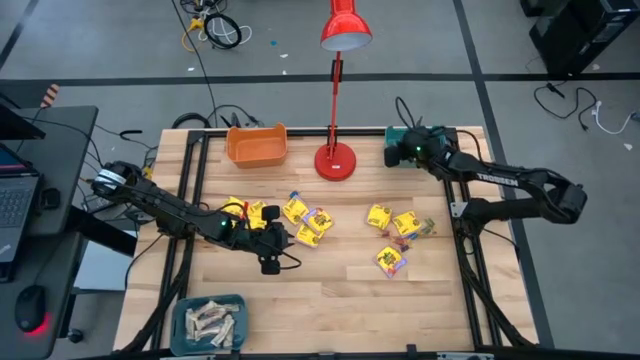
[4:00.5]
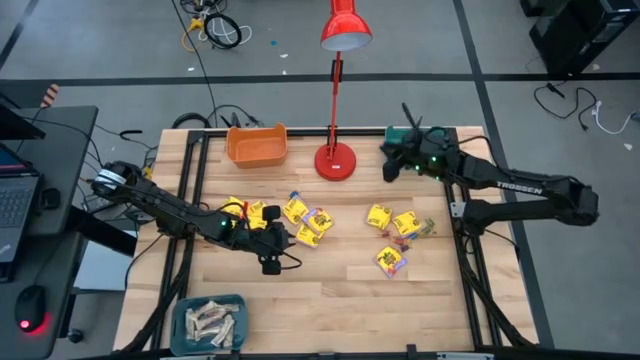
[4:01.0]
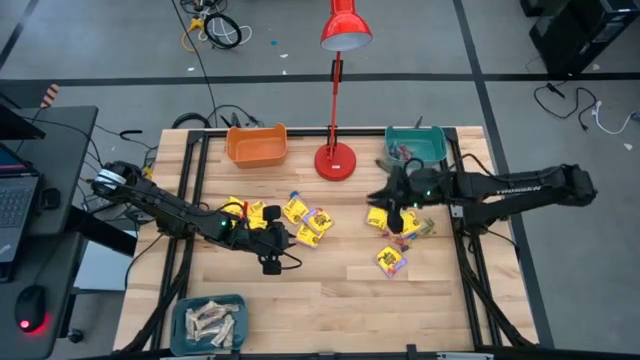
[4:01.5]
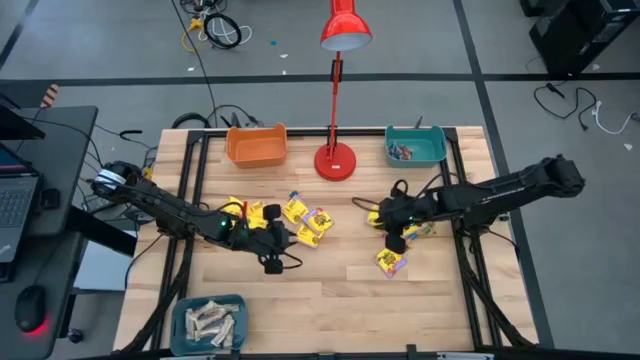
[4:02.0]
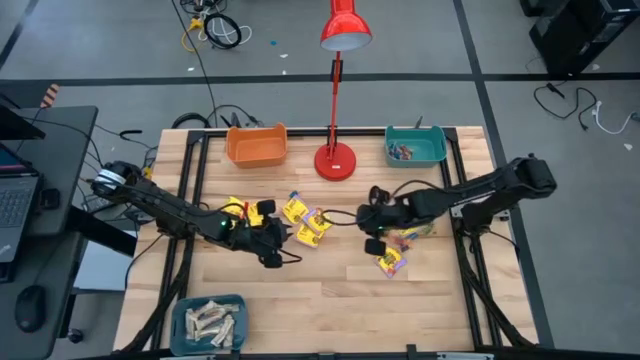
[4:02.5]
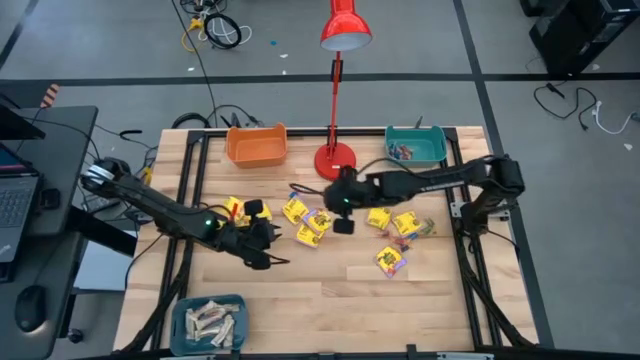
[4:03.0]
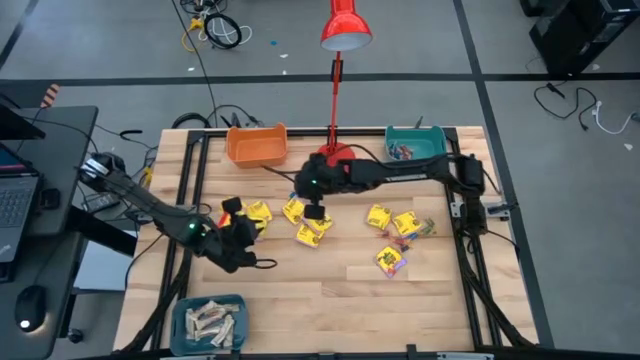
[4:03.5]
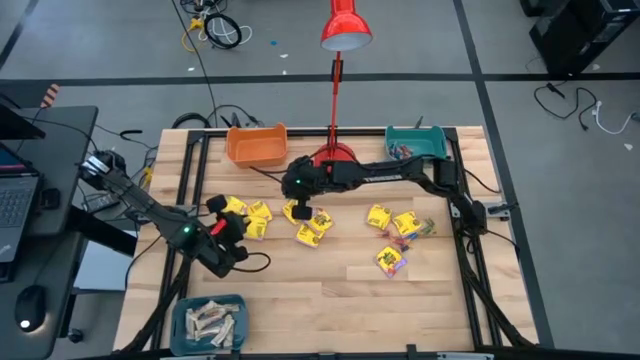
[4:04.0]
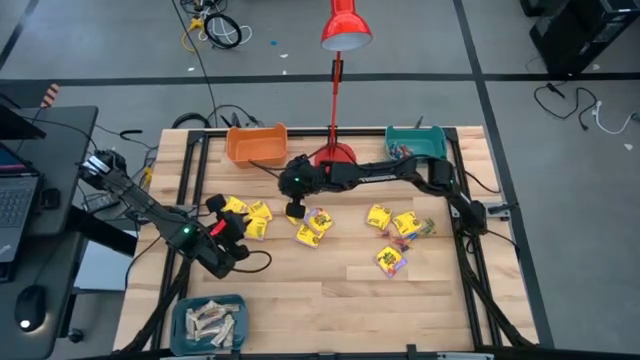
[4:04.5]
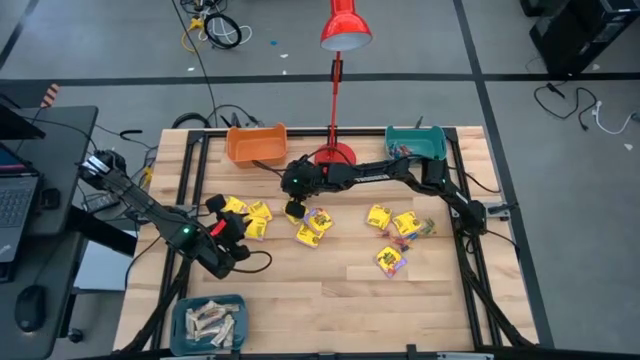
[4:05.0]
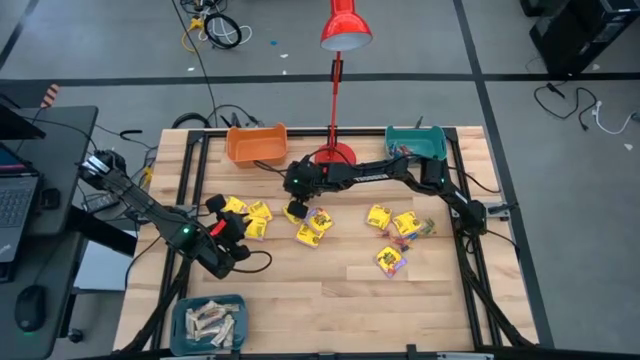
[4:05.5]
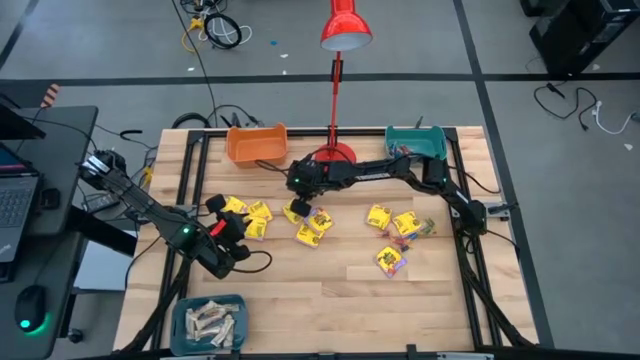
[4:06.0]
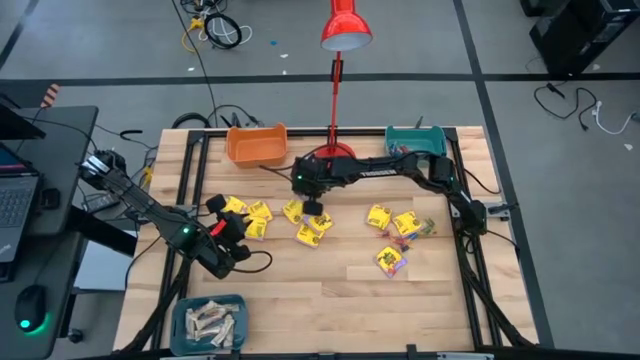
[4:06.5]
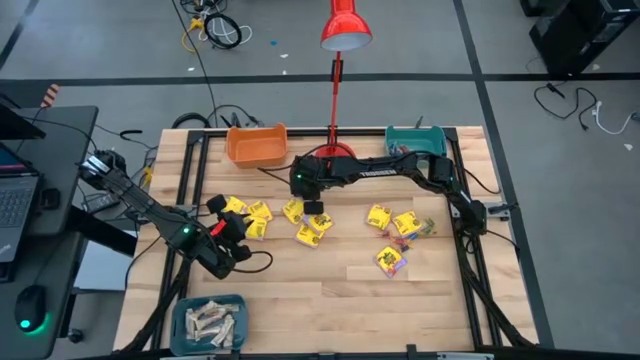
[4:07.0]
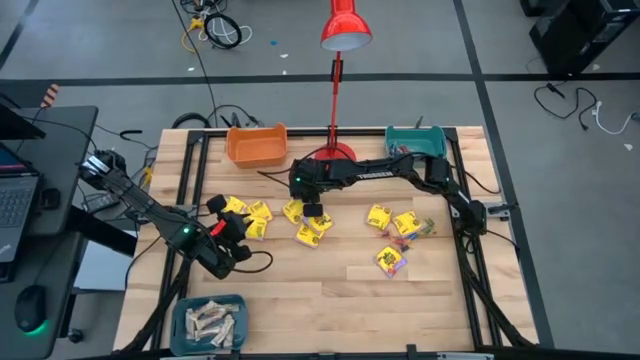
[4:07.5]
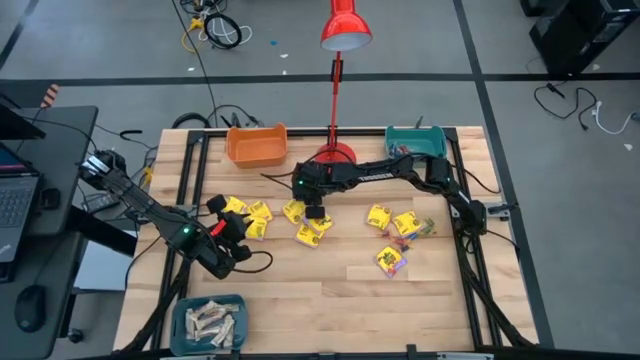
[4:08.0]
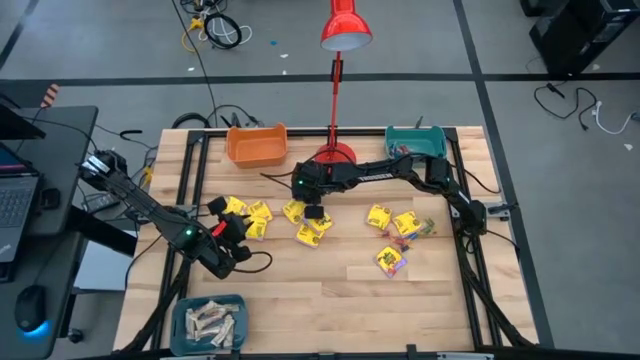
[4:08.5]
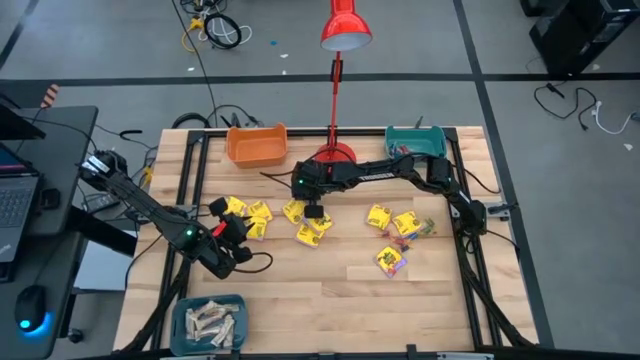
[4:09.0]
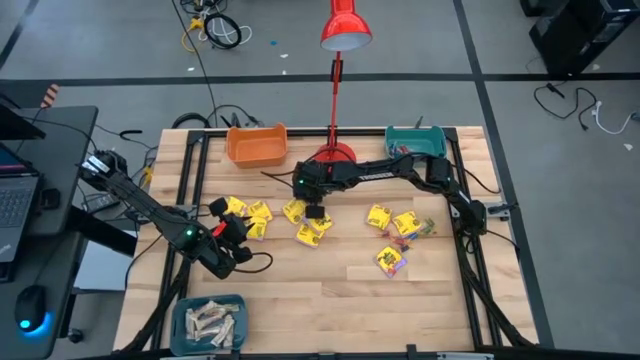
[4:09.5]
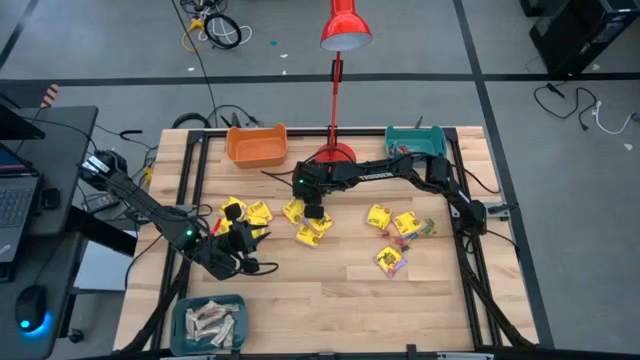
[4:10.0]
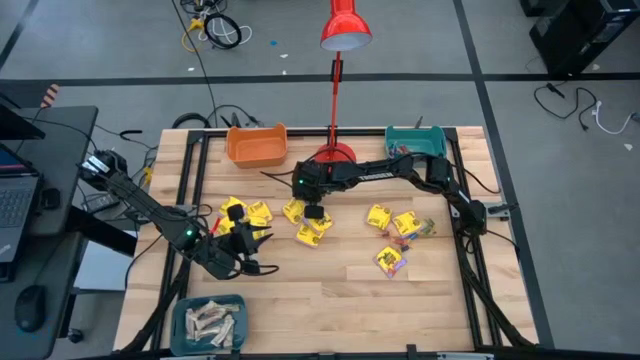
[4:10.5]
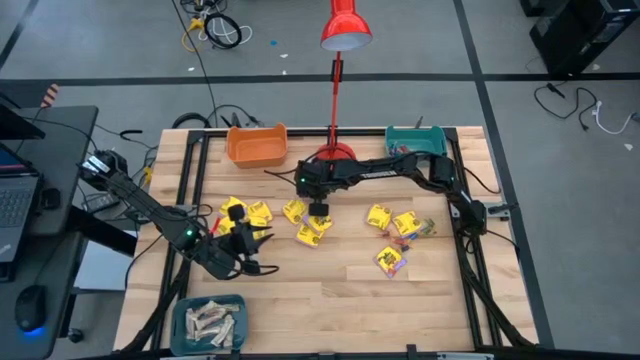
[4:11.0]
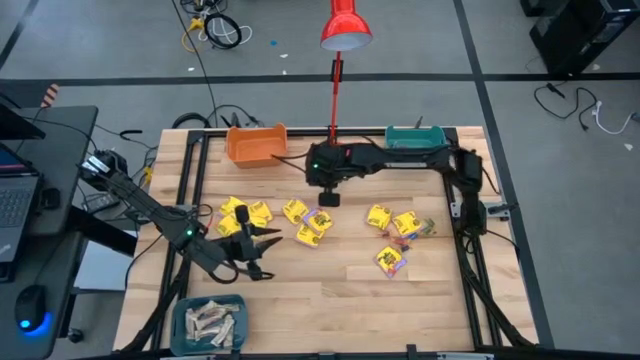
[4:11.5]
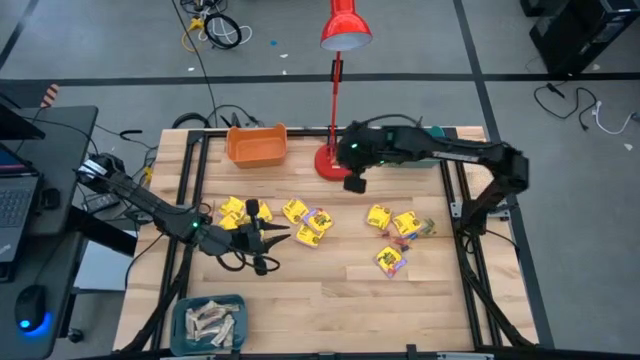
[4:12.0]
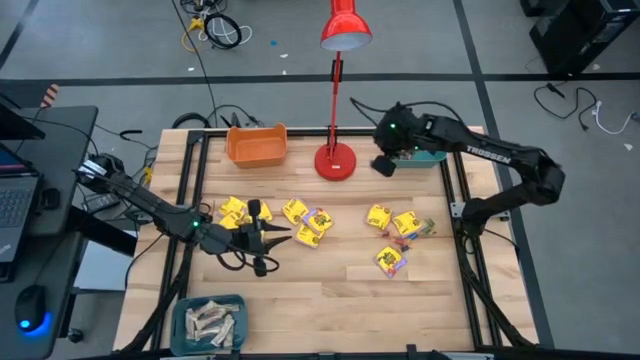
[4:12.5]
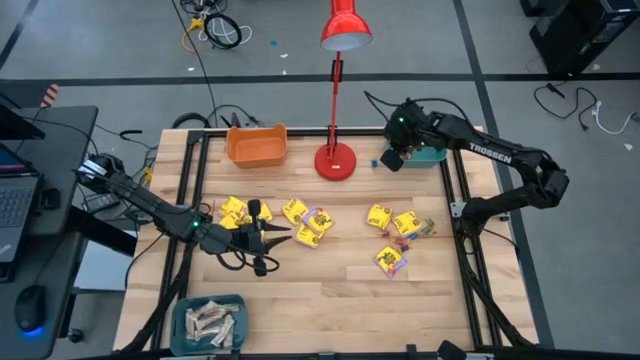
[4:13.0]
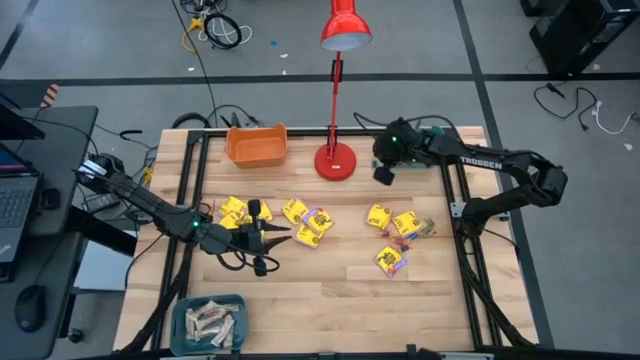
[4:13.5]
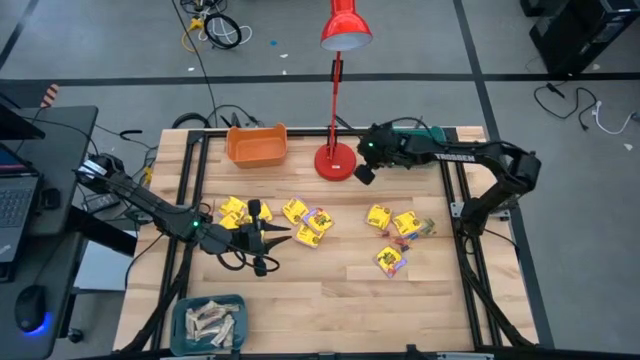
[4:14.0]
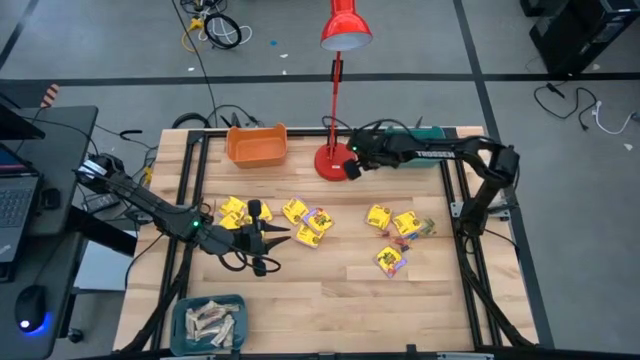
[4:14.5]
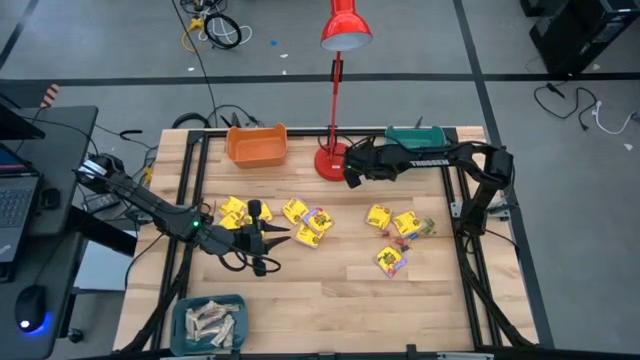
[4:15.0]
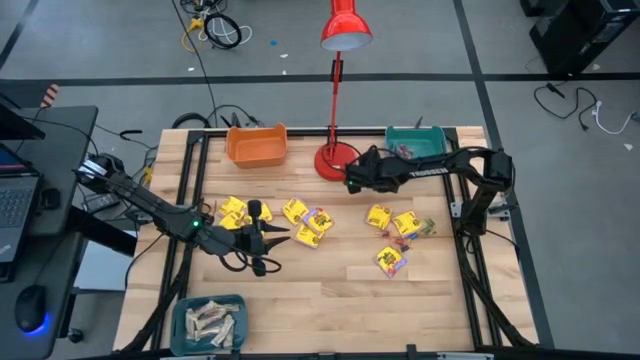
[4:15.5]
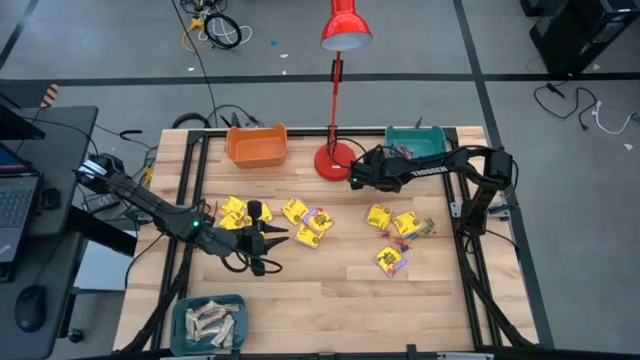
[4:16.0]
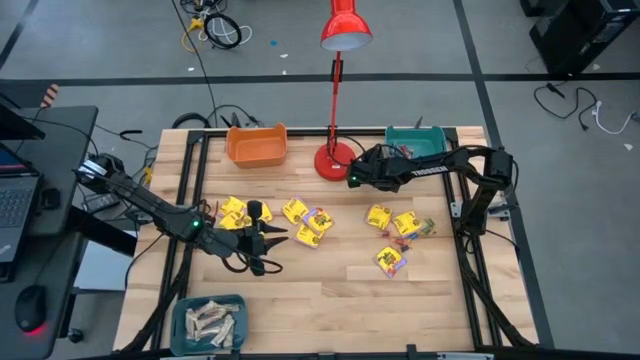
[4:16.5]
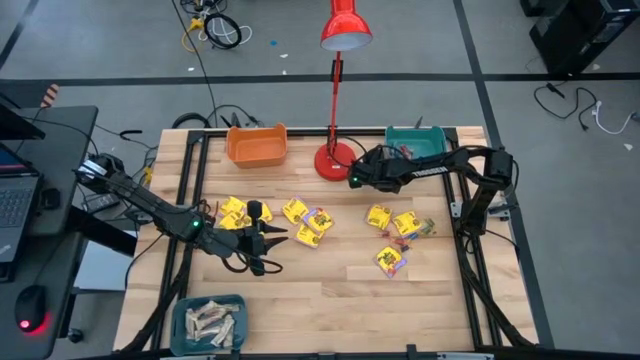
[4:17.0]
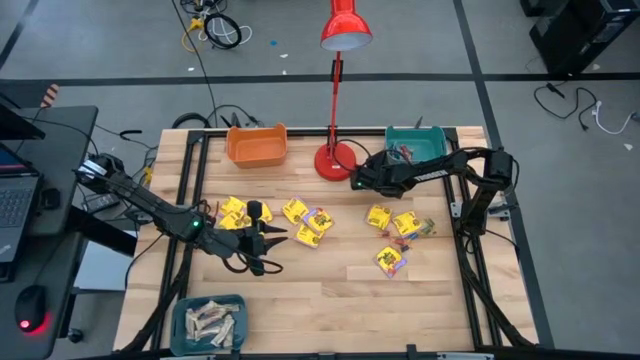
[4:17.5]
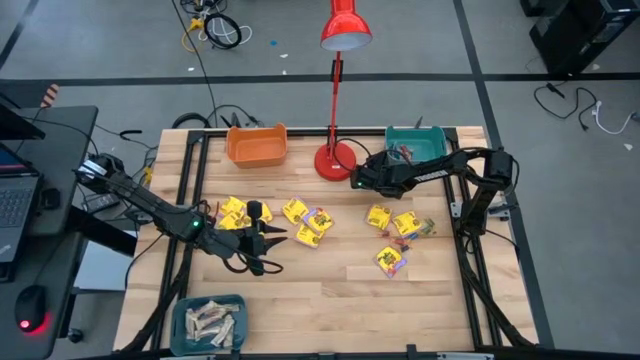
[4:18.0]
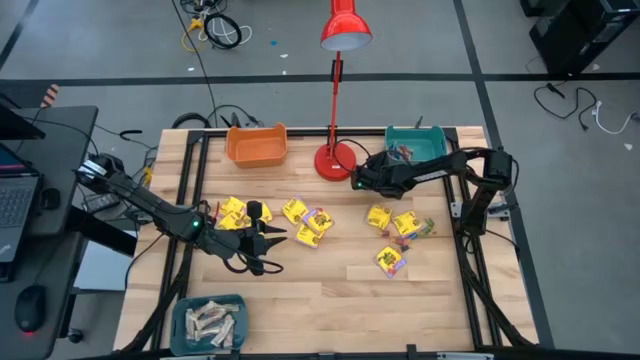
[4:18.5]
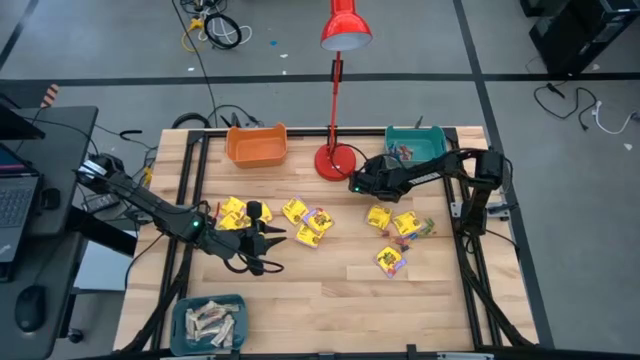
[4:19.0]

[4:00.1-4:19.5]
Task: Sort candy
Put the small blue candy into the green bin

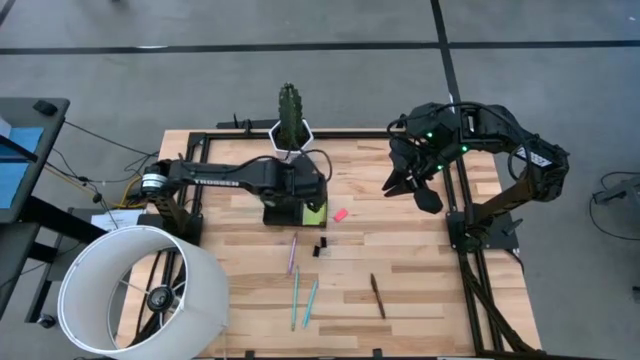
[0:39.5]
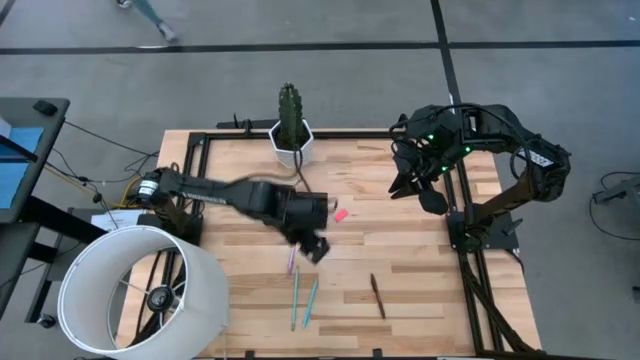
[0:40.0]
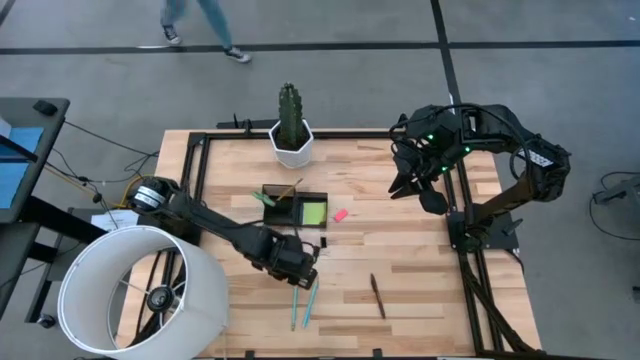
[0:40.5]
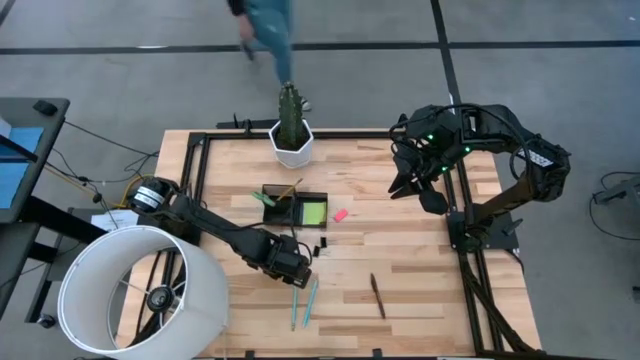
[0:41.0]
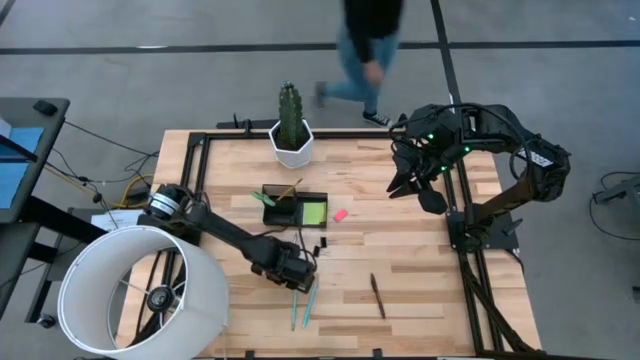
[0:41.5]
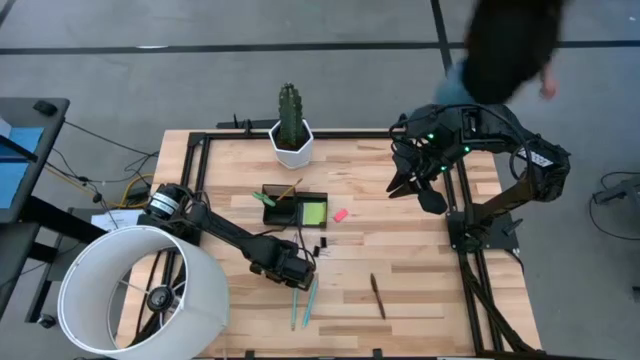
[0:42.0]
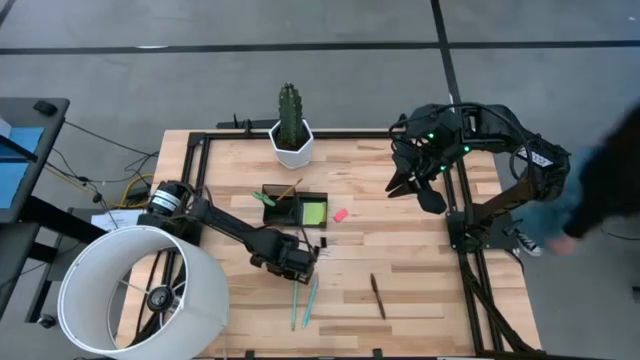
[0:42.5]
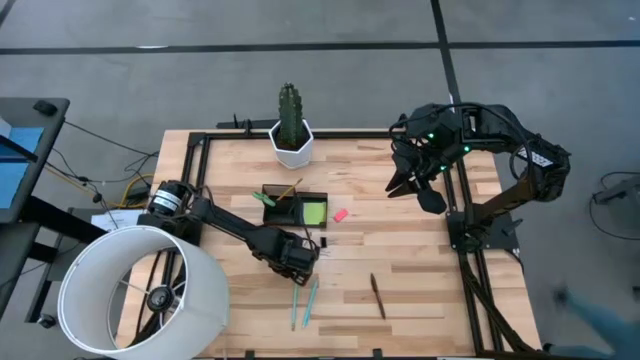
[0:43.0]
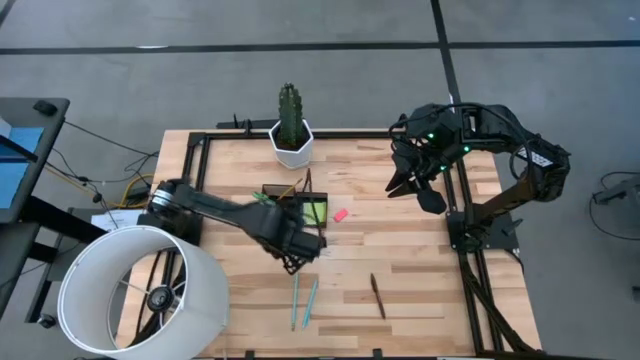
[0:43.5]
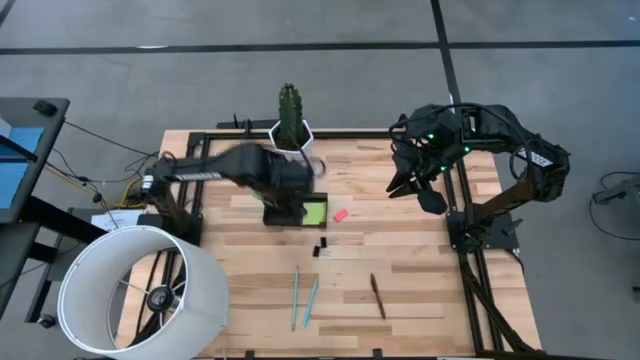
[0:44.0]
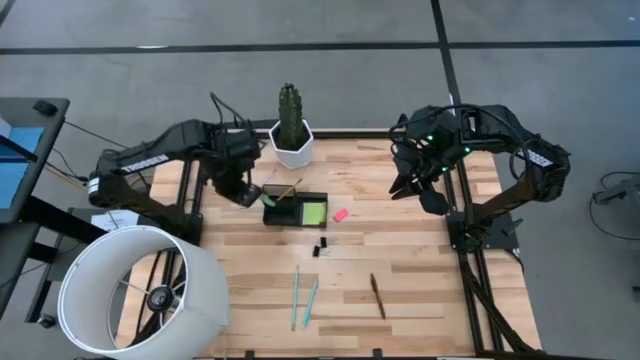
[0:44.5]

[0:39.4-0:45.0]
Task: Pick and place office supplies into organizer
Put the purple pen into the black mesh organizer
